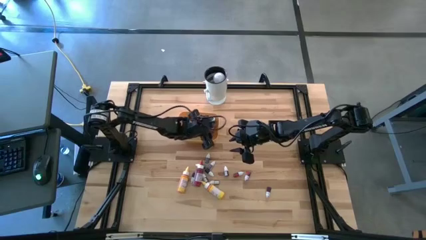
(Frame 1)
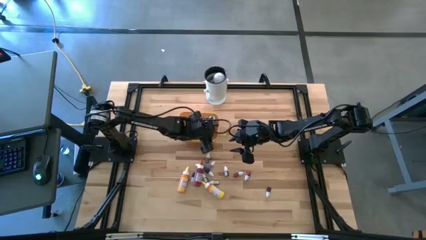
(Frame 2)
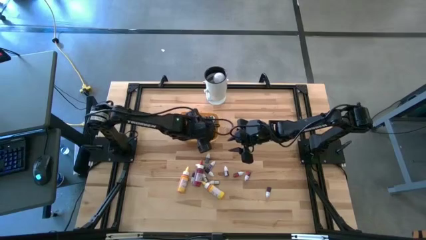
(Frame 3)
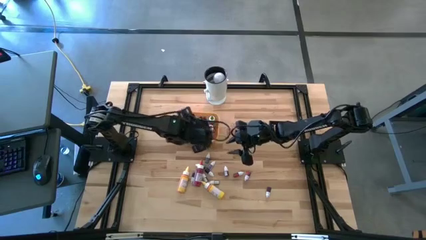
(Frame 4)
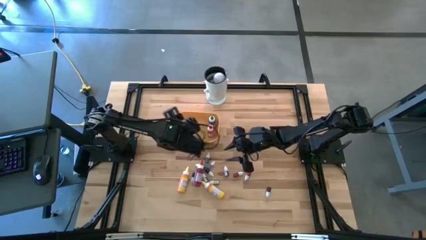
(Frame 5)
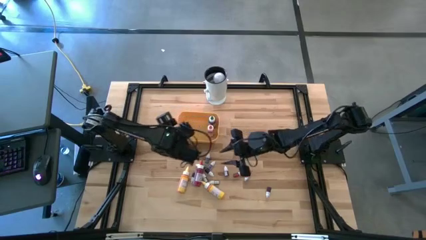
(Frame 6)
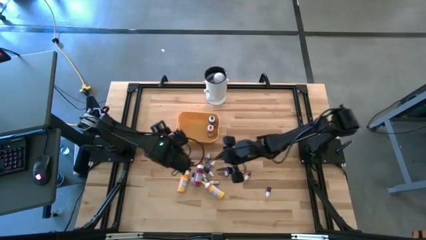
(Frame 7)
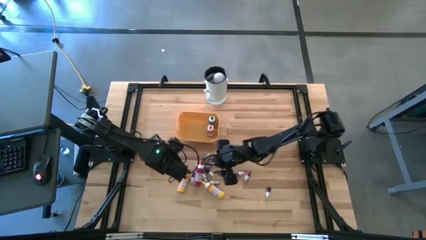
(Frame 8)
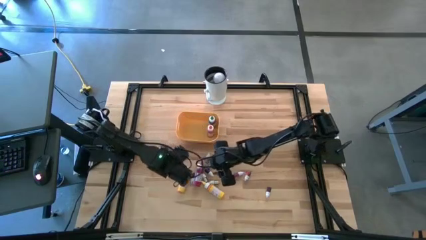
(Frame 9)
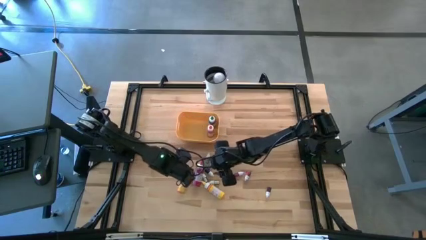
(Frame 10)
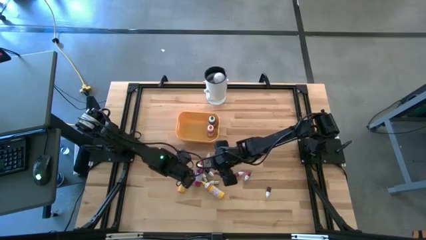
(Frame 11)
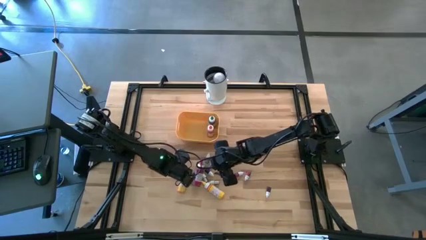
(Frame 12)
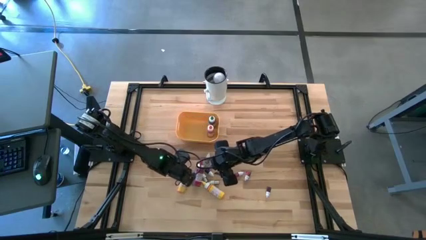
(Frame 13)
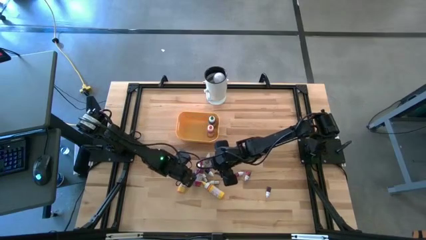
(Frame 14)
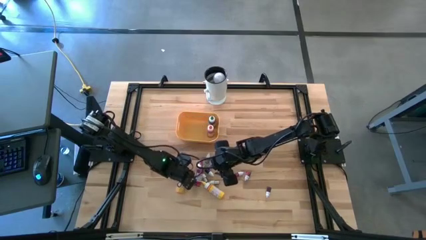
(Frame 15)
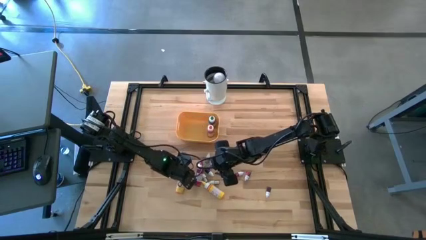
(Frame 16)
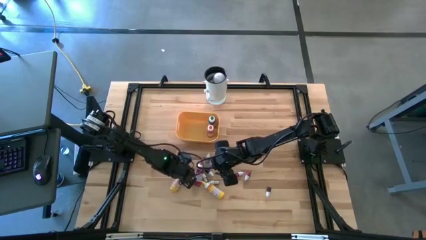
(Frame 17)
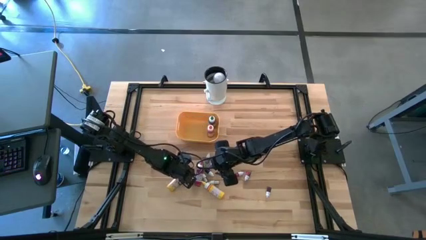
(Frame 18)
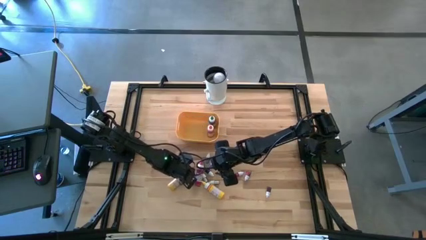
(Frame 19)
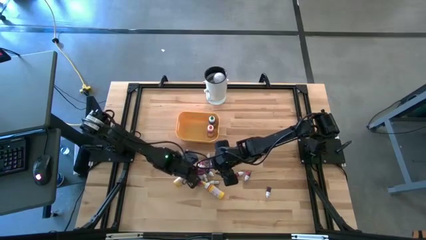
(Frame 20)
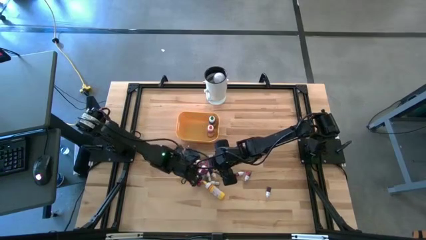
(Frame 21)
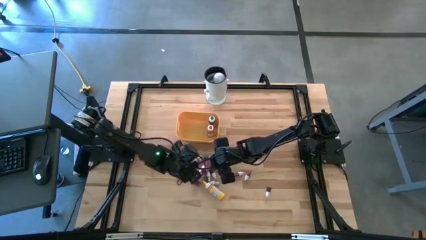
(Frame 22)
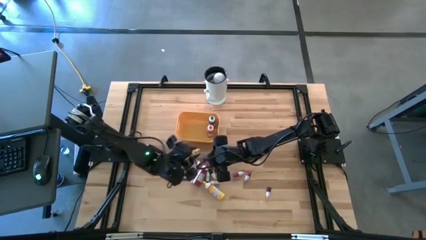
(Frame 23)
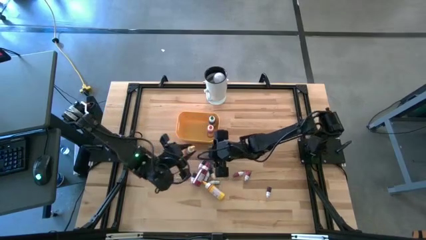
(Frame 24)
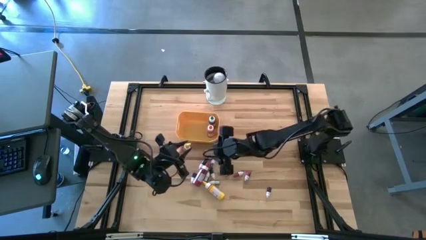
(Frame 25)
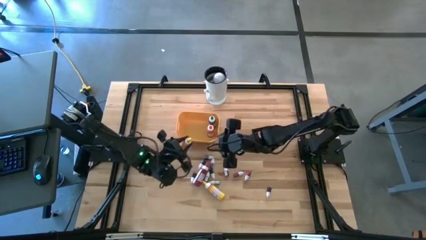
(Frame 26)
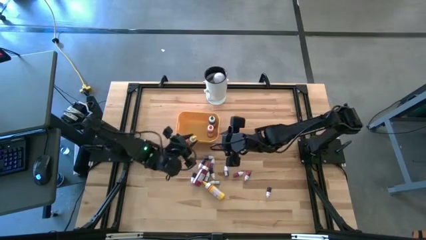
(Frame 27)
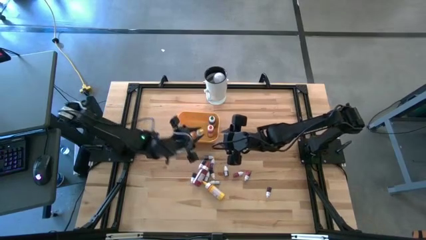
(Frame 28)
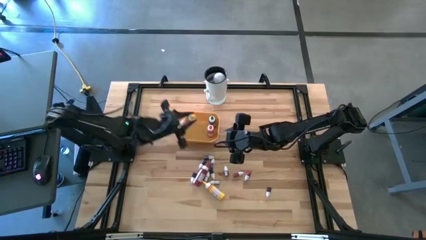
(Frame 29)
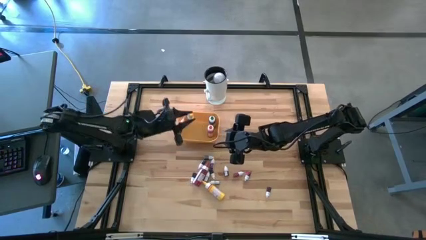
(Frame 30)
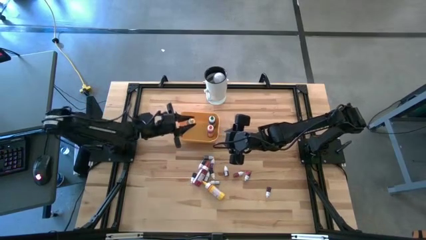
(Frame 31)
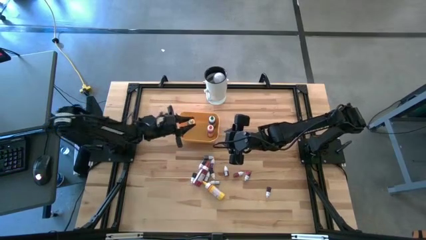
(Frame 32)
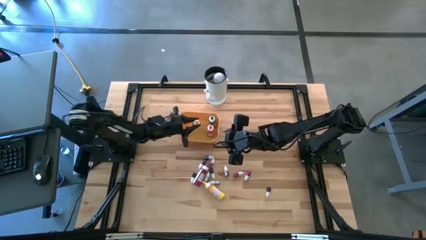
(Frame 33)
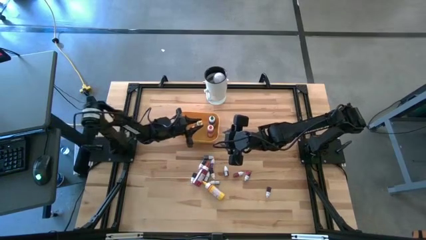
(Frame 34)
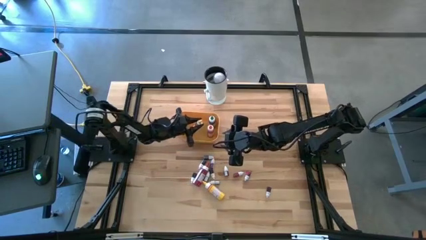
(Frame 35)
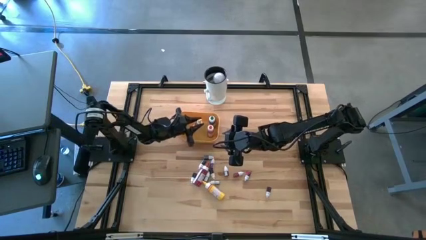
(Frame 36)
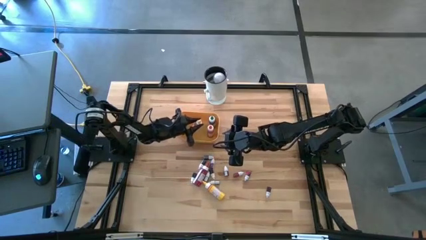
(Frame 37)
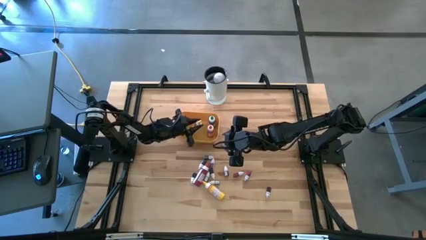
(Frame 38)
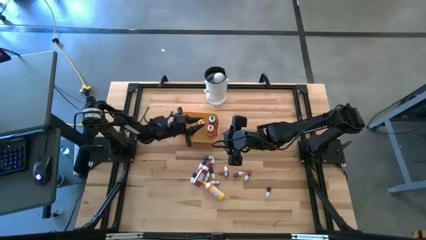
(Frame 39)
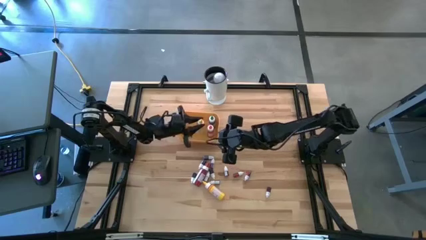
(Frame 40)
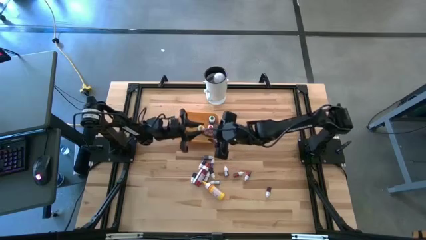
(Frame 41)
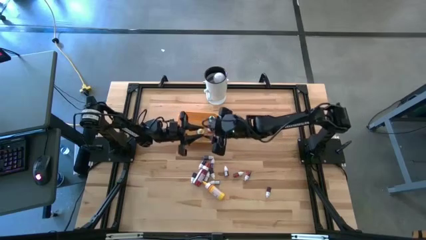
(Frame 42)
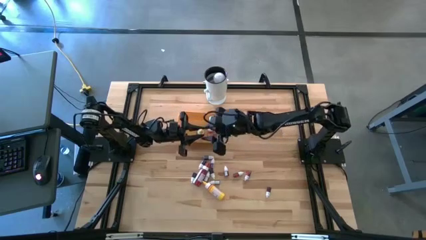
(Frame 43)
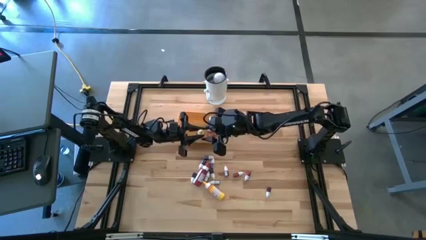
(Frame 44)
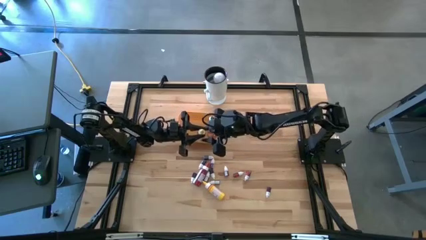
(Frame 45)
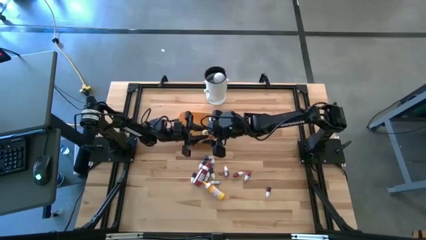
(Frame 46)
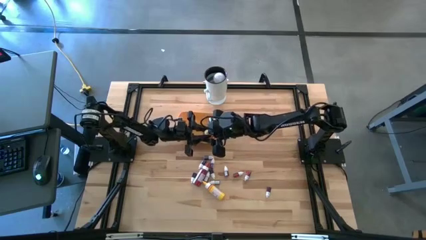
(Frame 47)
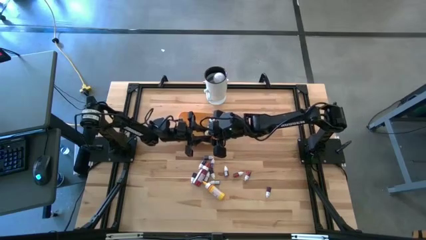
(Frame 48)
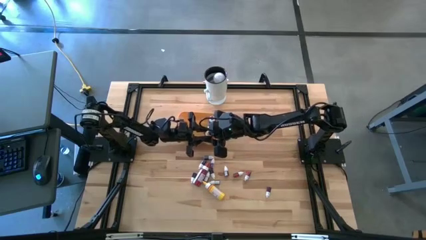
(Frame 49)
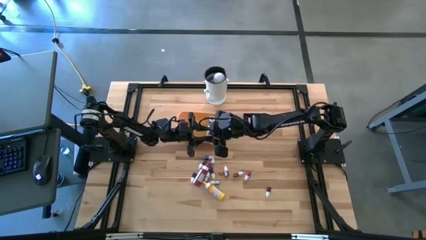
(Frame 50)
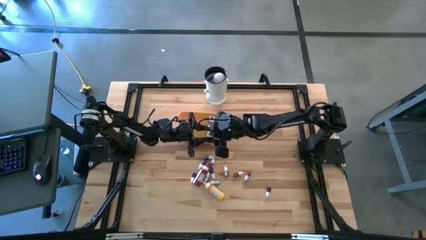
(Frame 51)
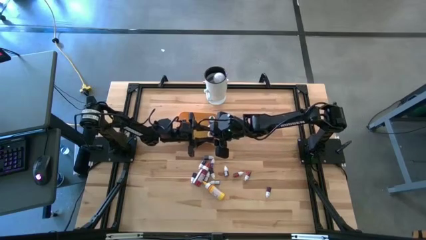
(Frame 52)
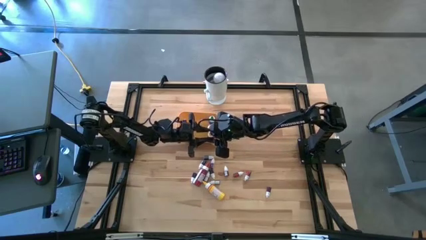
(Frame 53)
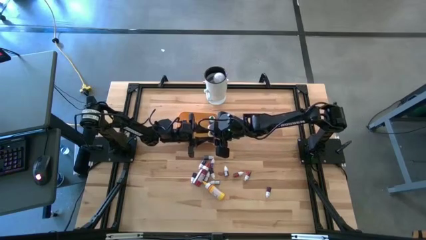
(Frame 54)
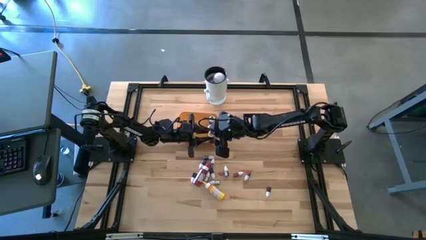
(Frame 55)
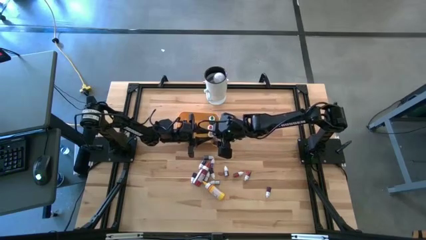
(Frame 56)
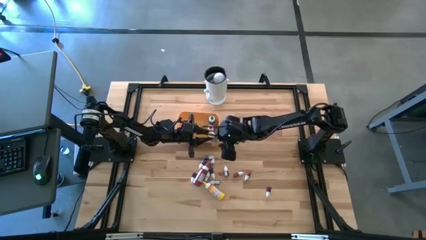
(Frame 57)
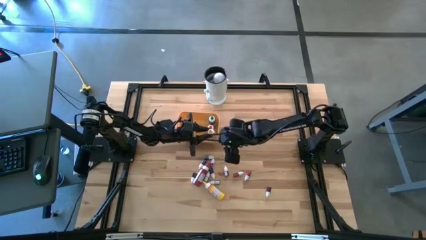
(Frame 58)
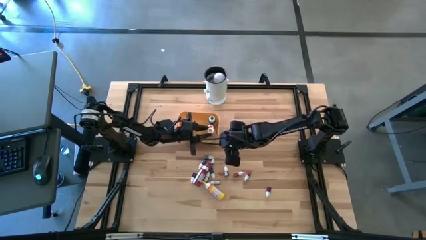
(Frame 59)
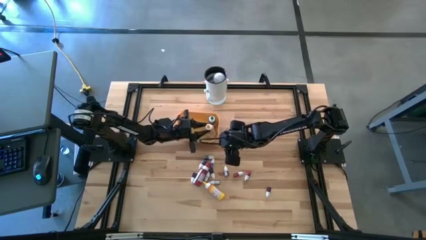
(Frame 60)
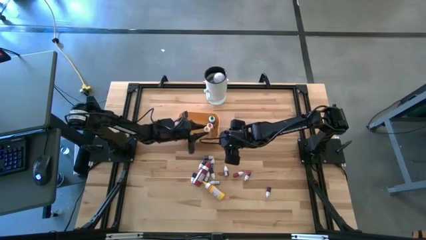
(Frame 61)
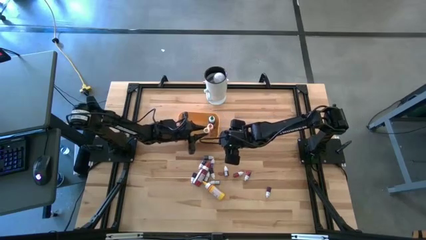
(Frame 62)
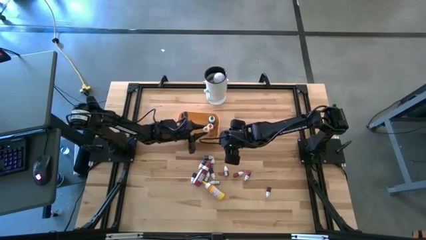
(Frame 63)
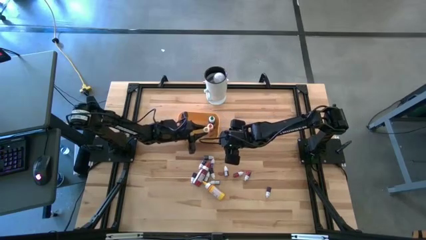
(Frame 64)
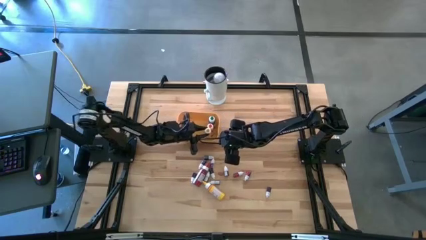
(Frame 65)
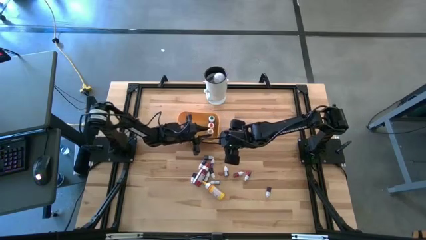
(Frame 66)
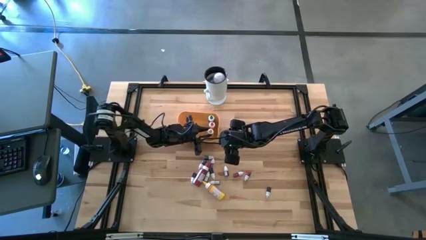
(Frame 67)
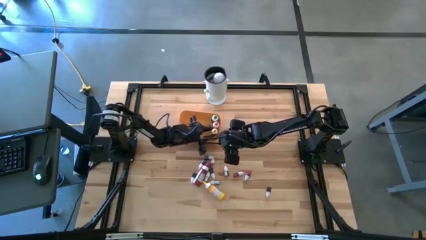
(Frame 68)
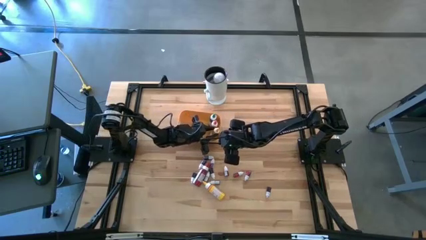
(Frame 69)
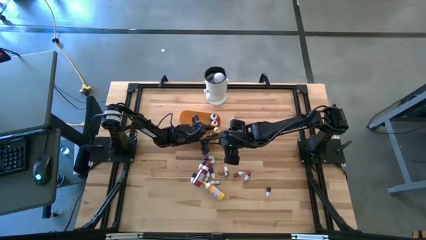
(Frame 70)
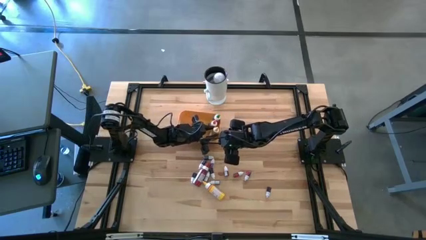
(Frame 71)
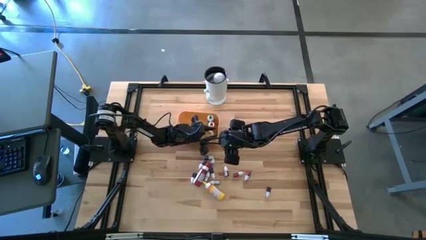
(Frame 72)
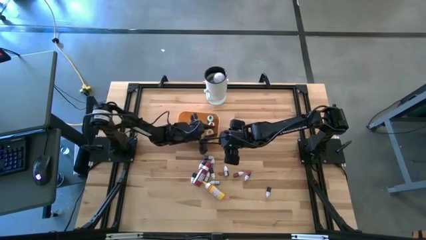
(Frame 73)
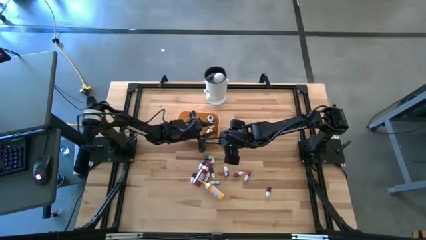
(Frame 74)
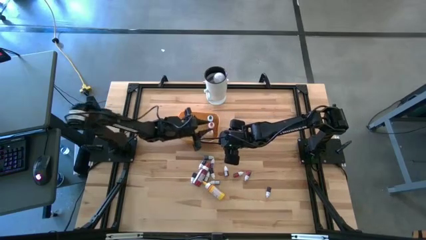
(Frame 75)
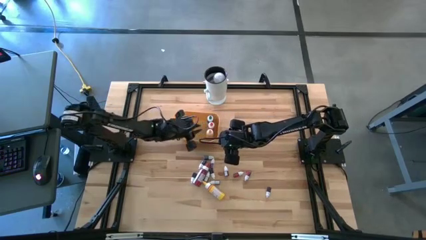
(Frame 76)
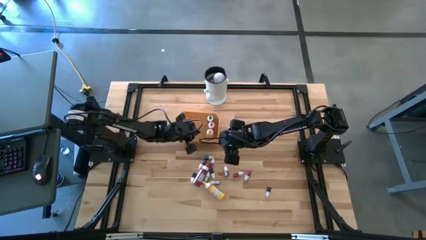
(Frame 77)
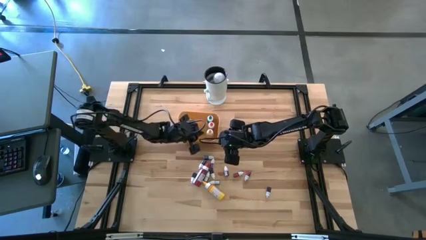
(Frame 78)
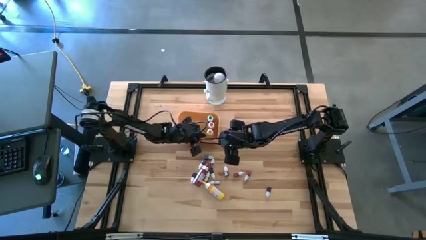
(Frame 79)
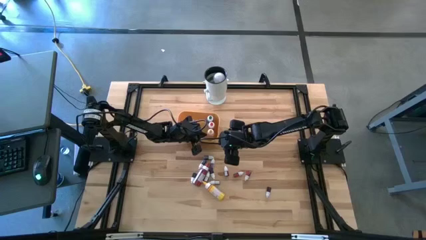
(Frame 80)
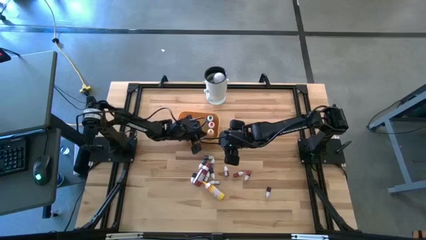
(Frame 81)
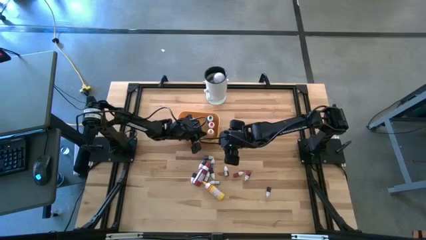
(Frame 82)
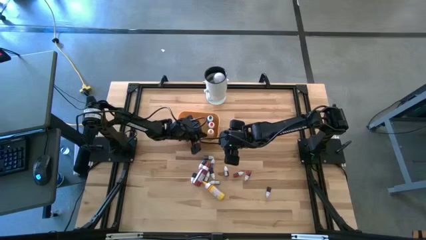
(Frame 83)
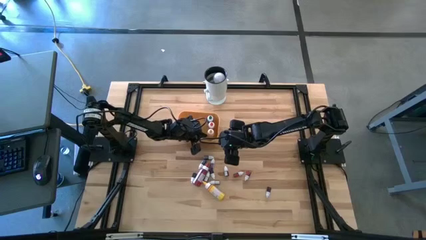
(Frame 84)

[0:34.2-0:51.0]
Task: Pick & Place food coloring
Put the large yellow food coloring bottle into the yellow bin

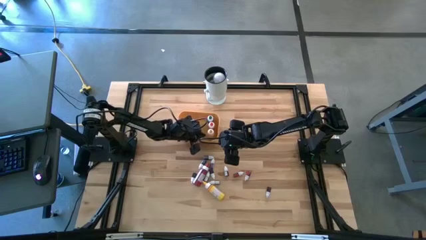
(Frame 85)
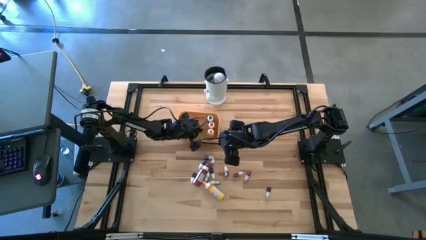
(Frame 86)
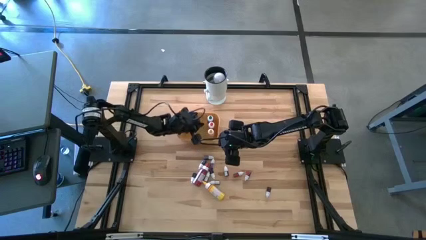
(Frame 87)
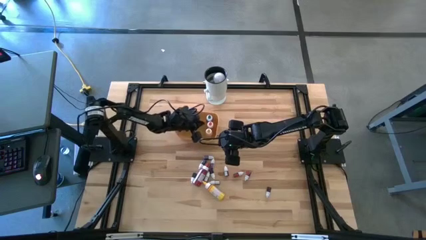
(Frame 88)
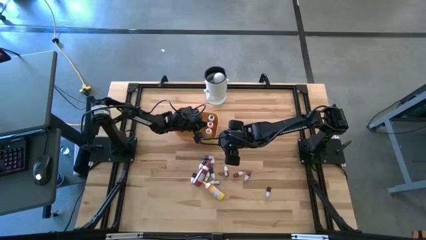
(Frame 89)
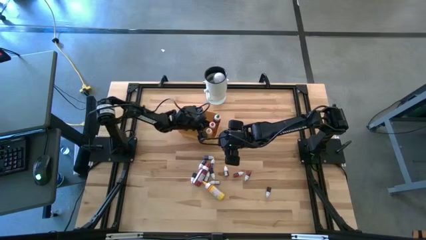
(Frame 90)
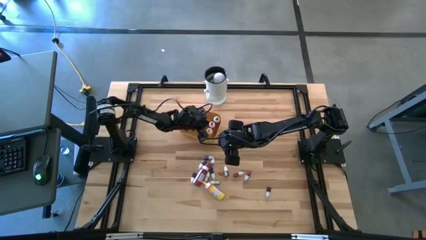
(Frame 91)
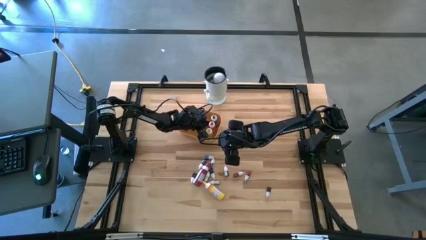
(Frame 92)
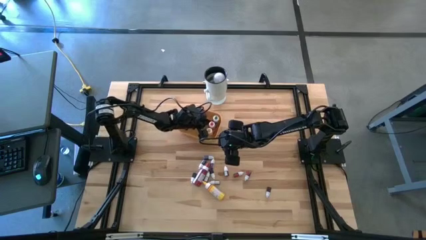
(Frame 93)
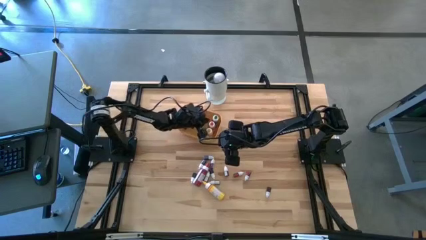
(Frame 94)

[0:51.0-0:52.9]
Adjust the food coloring bottles in the yellow bin
